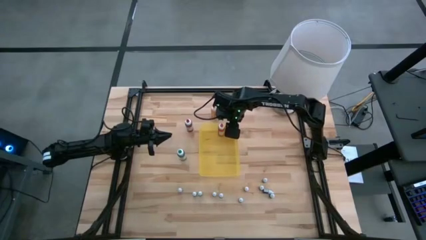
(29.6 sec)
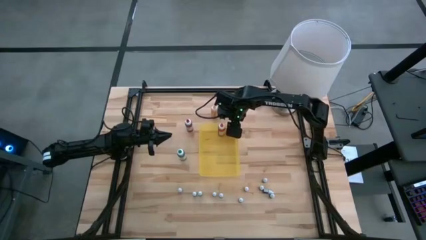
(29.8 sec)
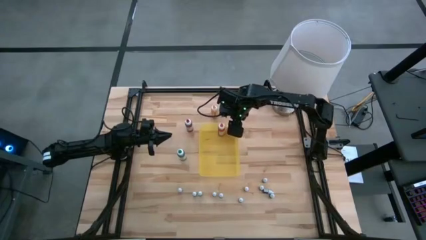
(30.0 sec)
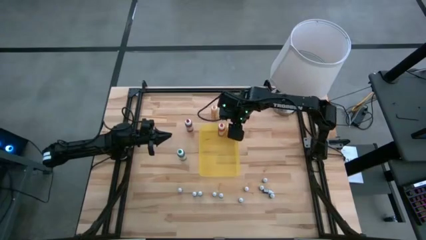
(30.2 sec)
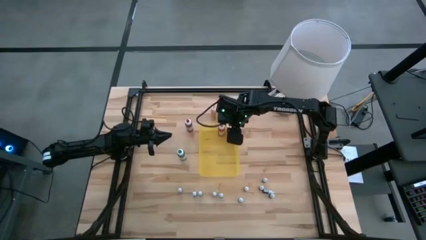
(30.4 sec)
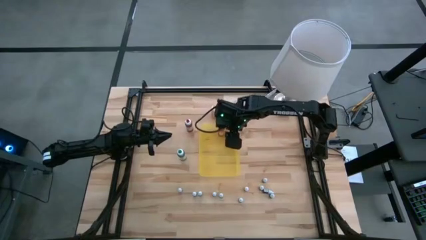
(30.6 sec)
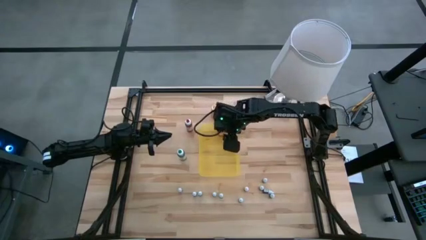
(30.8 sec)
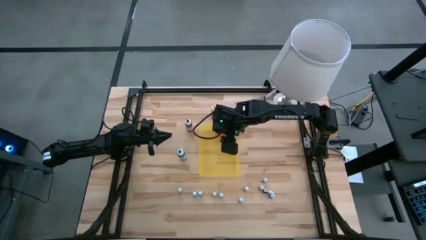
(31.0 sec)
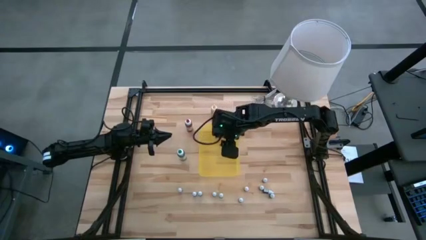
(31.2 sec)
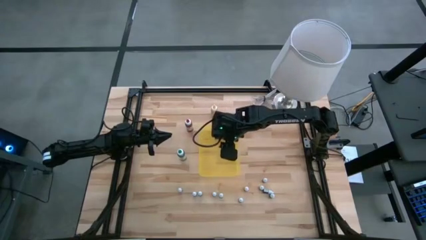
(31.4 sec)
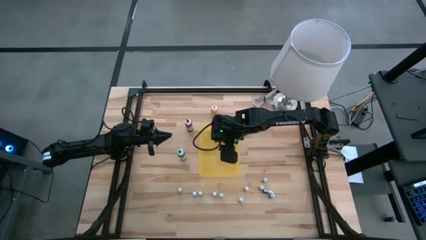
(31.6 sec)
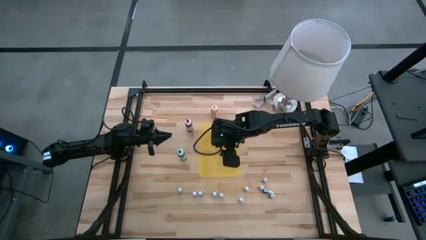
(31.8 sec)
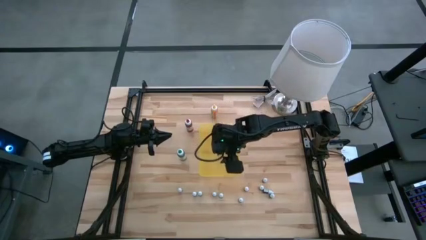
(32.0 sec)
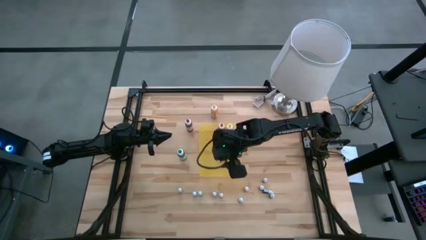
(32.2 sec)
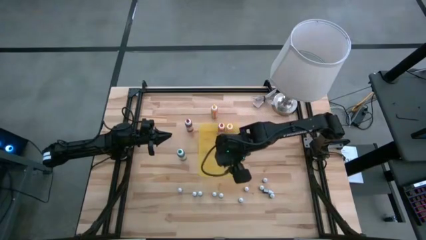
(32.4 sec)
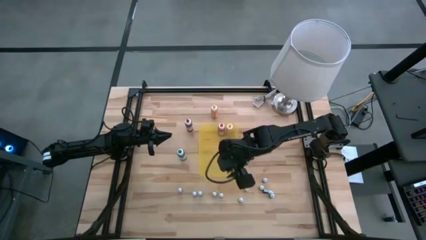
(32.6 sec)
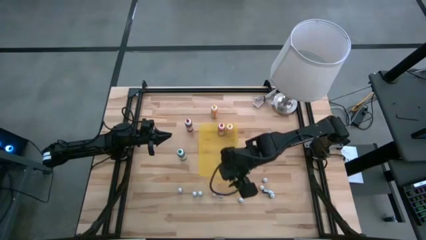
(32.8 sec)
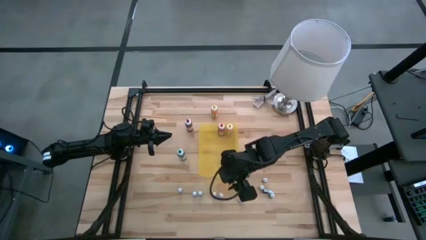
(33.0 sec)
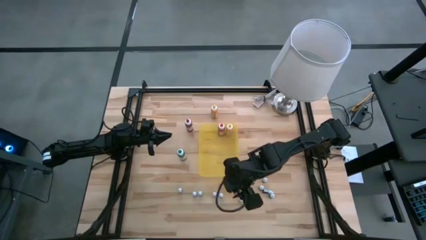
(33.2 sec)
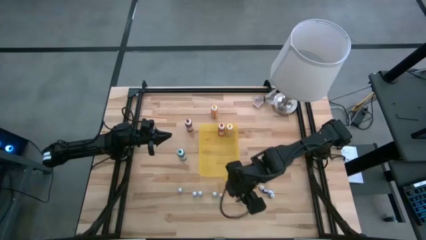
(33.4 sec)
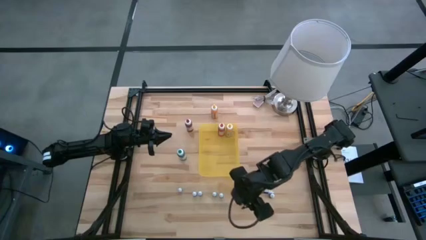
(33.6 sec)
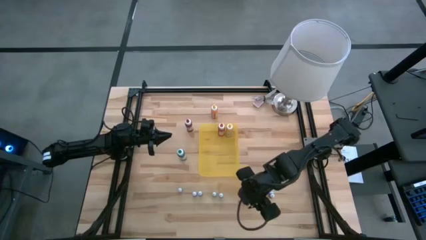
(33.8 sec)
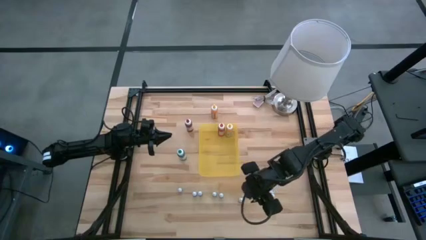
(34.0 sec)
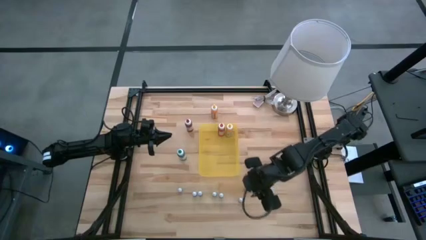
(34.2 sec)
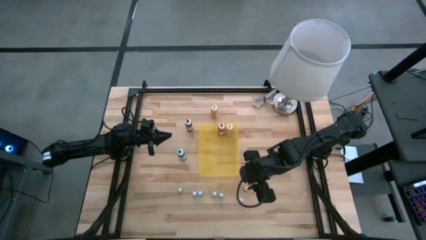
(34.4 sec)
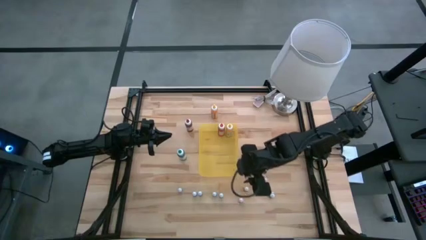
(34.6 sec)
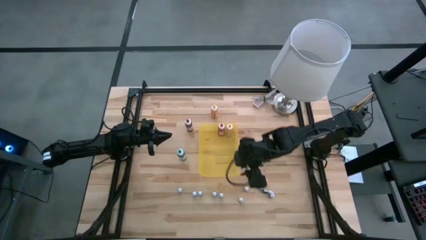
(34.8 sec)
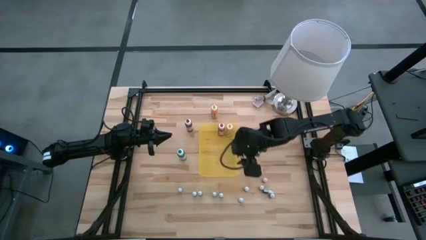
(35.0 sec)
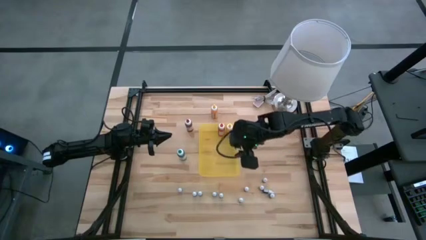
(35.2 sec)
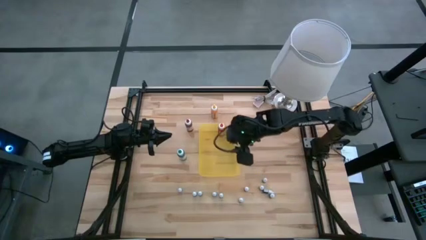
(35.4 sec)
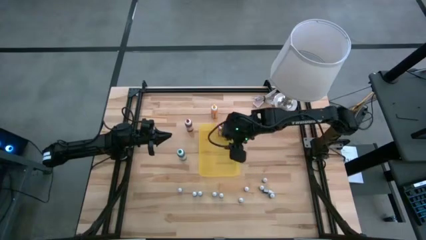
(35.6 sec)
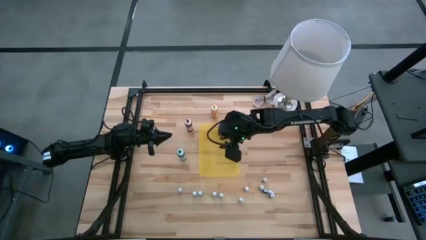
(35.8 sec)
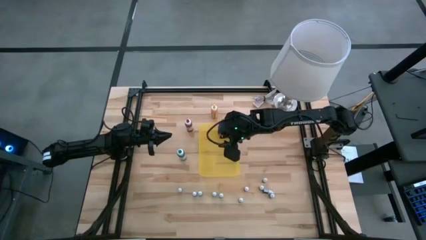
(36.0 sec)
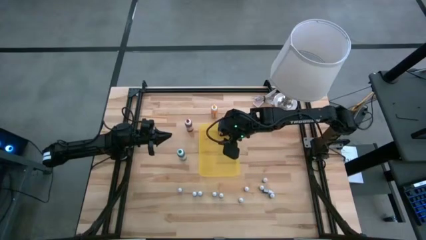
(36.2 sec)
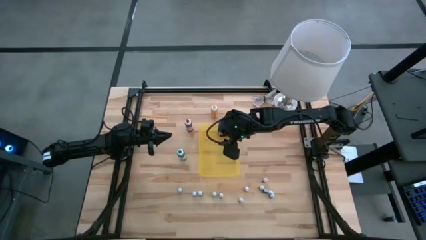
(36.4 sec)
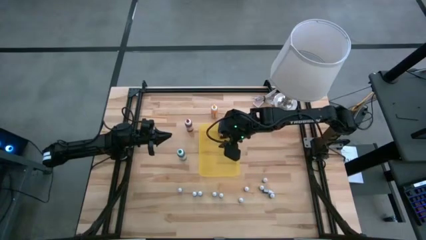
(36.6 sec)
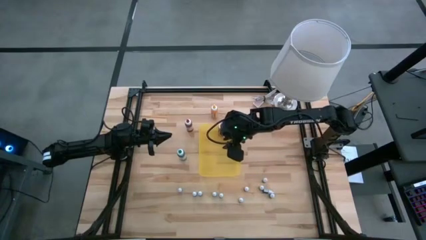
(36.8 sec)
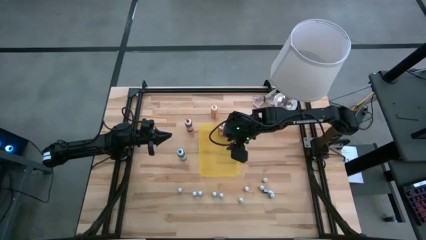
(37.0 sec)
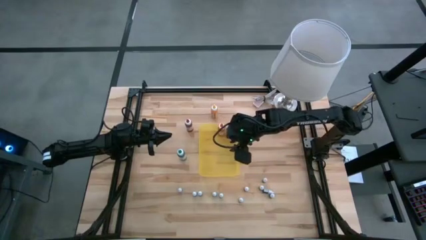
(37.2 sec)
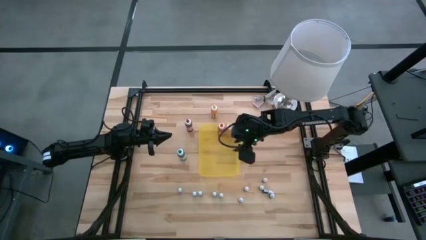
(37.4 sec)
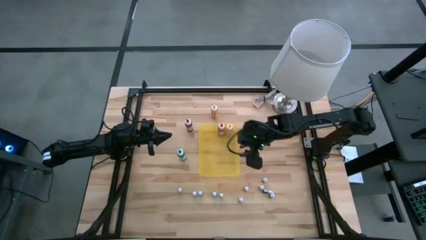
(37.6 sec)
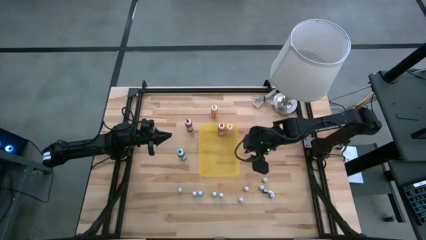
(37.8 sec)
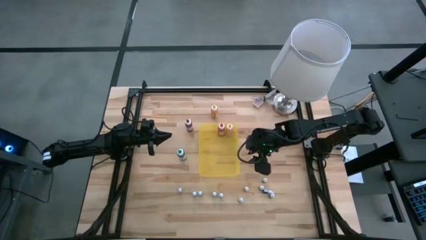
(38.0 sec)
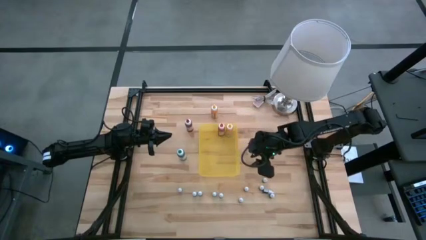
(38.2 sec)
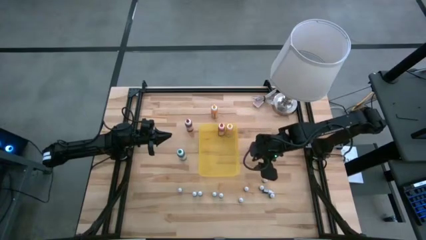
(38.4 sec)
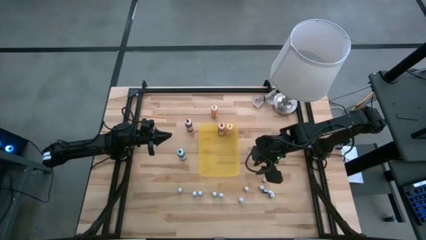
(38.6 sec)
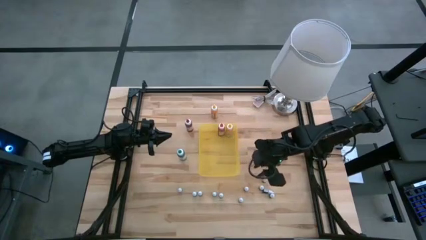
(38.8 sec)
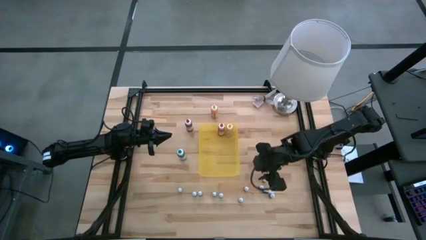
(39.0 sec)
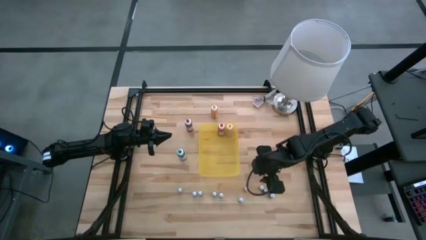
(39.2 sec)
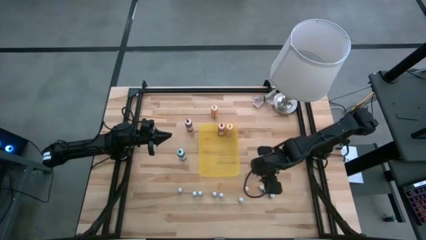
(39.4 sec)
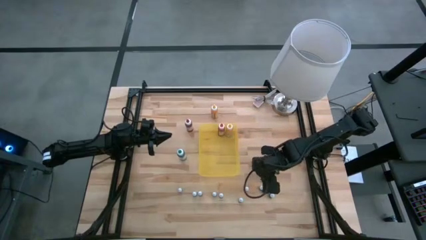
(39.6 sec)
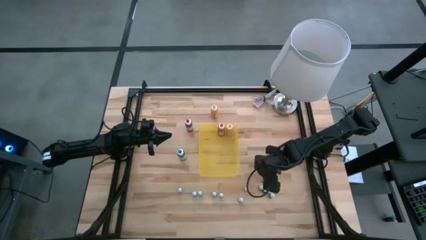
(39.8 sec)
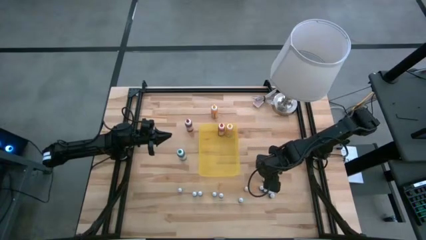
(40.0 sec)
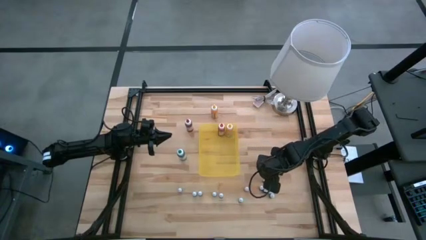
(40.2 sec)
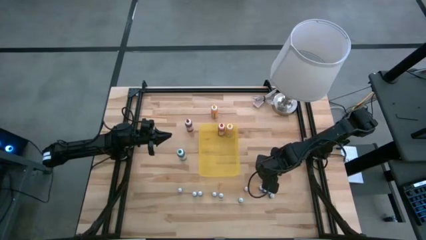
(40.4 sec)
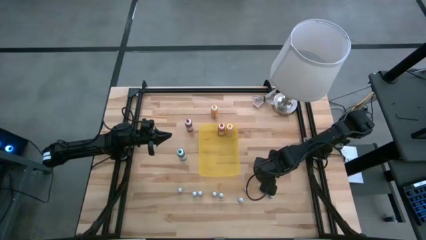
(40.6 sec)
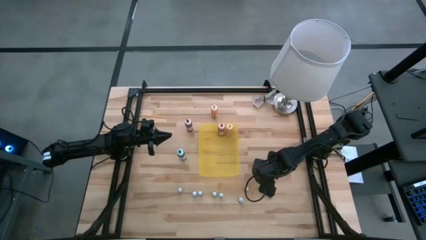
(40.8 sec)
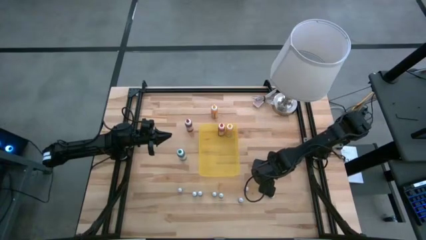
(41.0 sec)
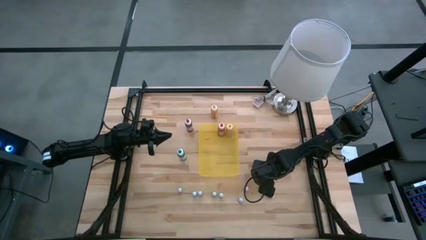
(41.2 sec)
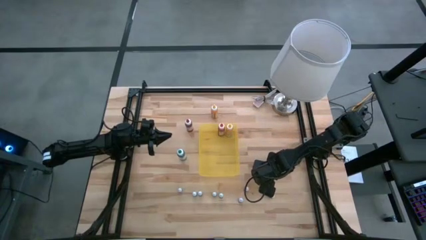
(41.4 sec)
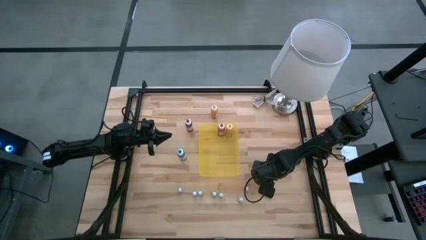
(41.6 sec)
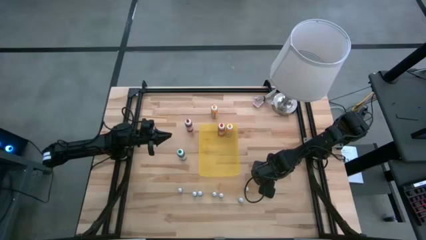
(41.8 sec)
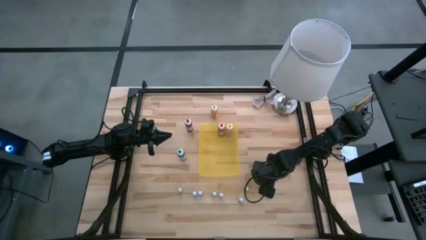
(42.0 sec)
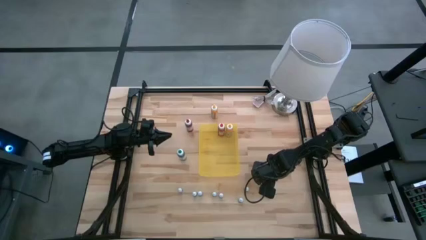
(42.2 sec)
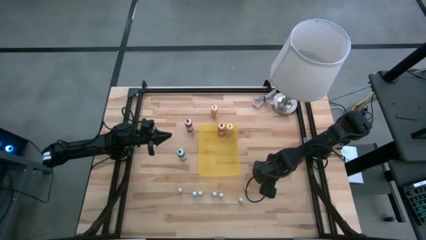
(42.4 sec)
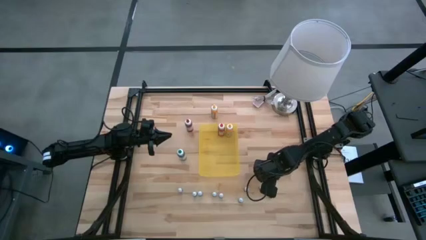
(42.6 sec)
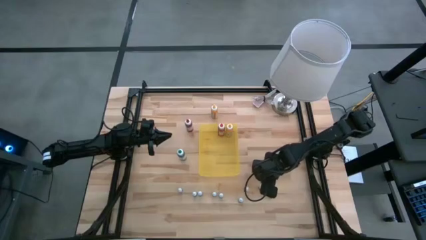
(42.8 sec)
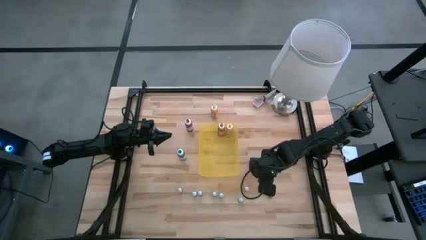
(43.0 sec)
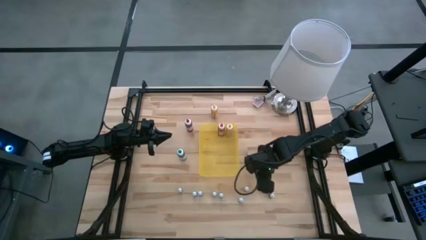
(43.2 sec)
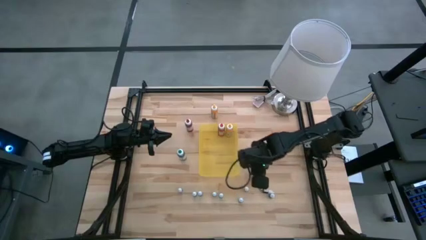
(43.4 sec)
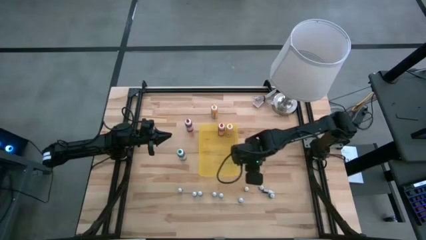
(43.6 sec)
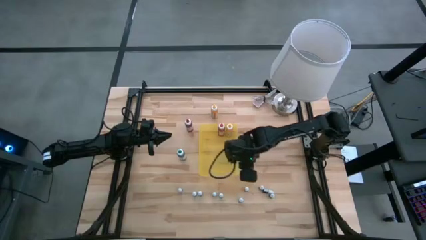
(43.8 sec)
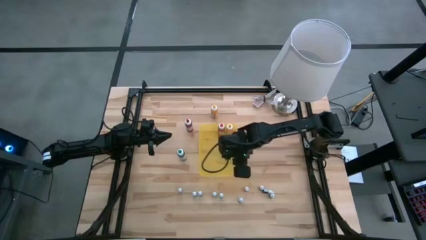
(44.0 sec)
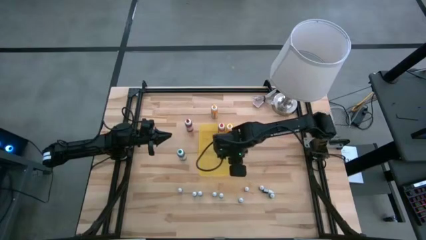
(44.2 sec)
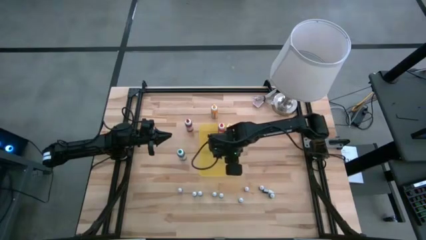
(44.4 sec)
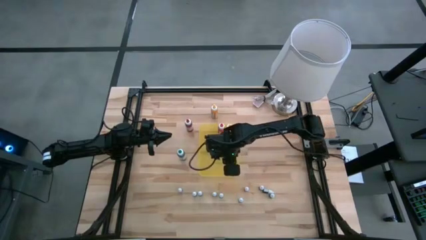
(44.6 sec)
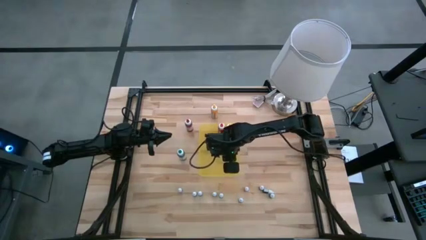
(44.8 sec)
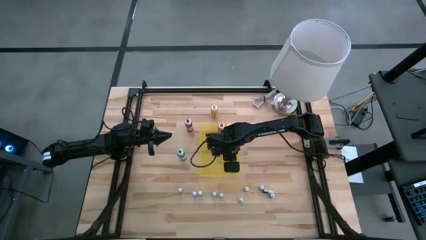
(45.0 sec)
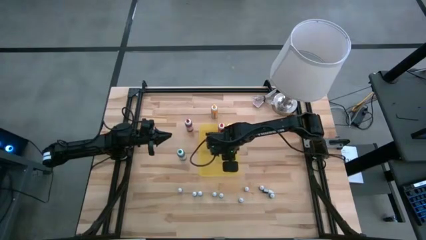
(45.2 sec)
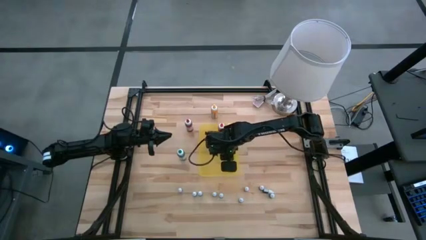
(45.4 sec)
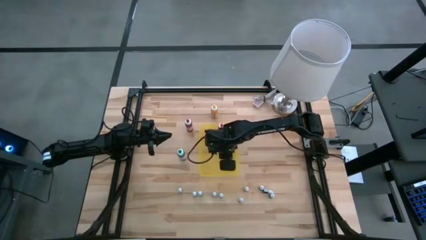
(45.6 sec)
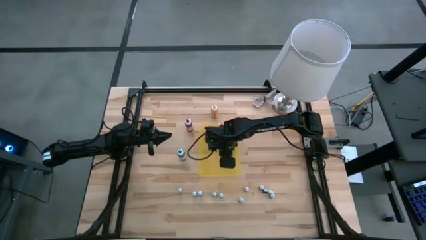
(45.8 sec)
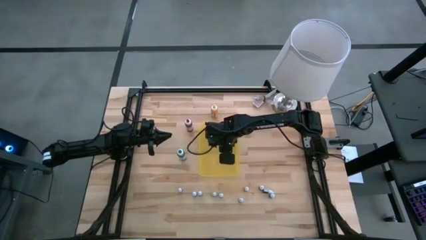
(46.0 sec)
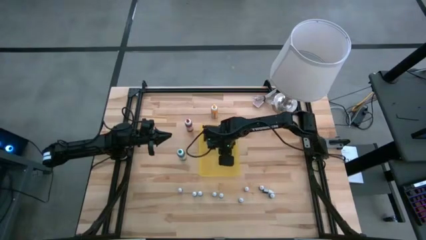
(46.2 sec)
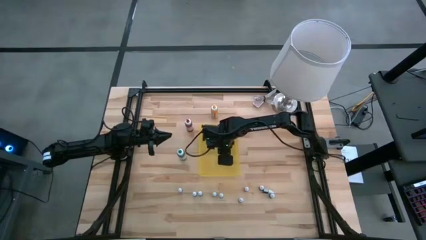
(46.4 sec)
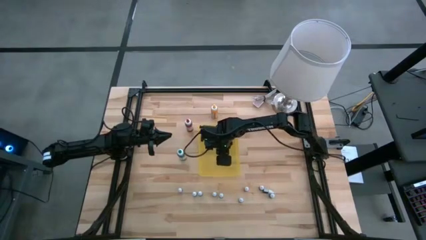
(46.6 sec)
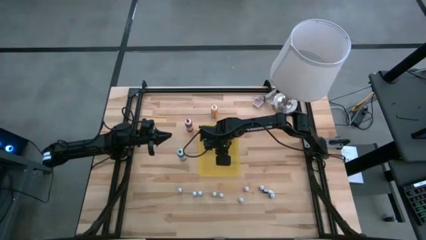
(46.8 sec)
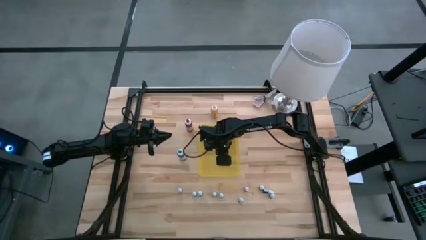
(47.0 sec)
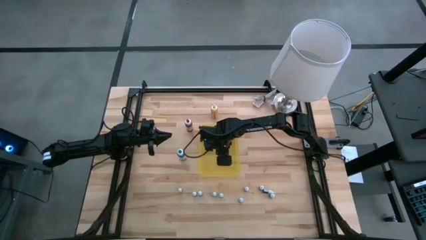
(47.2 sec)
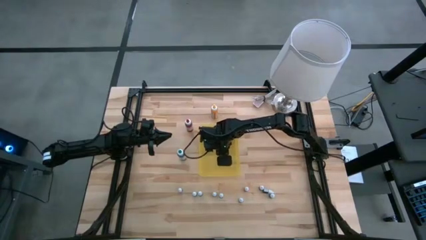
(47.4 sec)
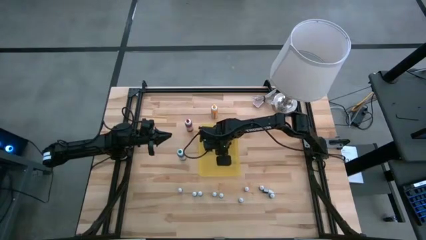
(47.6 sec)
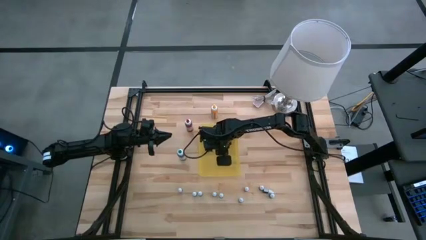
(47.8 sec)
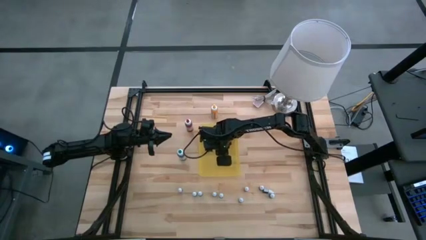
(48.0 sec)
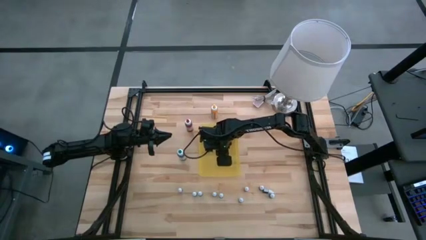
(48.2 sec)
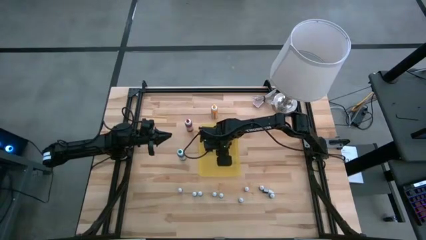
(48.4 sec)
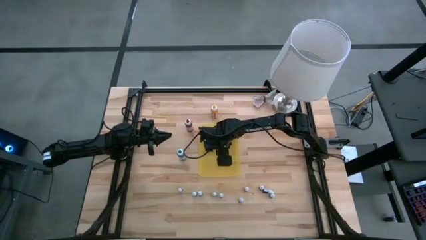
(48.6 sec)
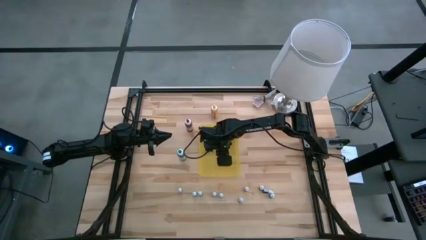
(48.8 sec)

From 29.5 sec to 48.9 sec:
Task: Pick & Place food coloring
Put the small black food coloring bottle into the bin
